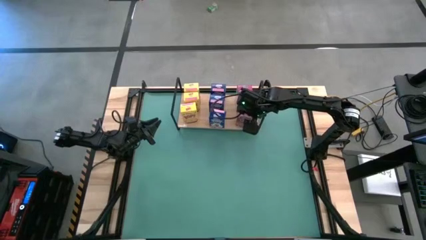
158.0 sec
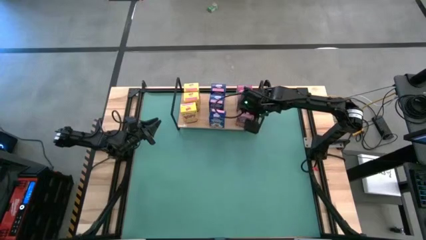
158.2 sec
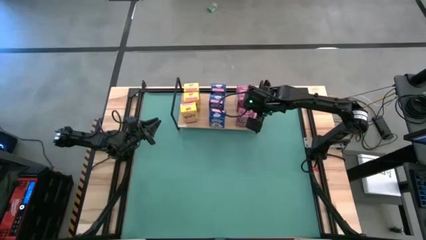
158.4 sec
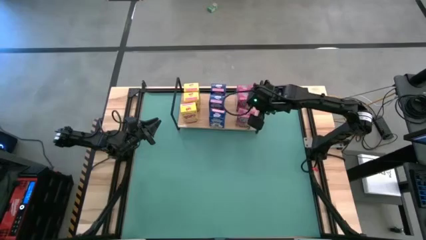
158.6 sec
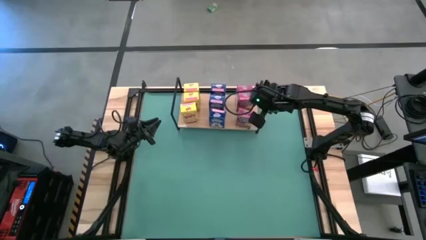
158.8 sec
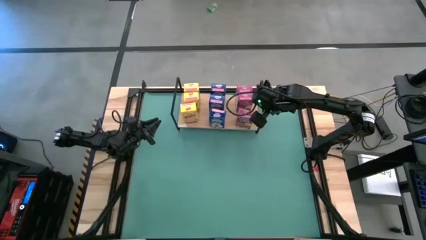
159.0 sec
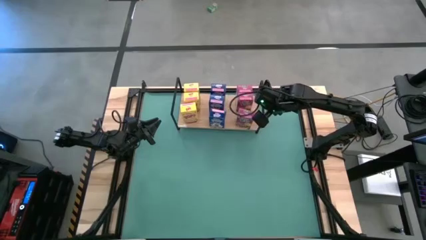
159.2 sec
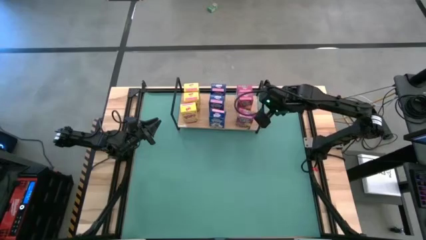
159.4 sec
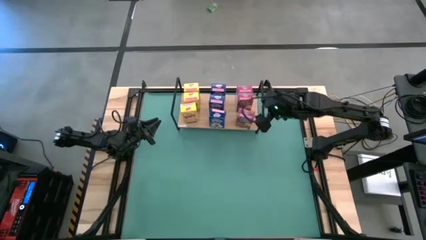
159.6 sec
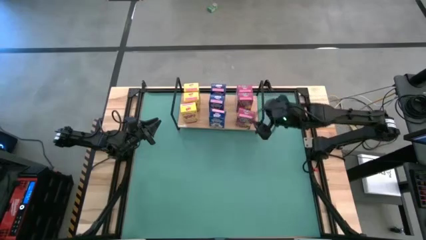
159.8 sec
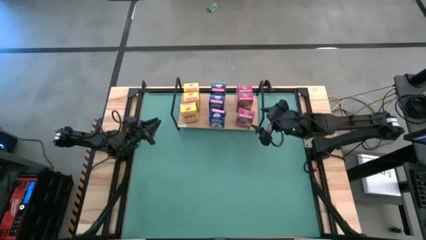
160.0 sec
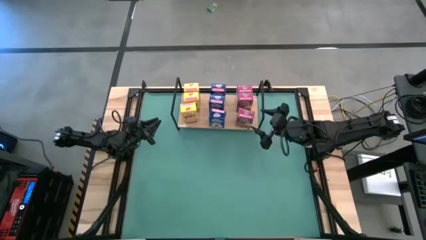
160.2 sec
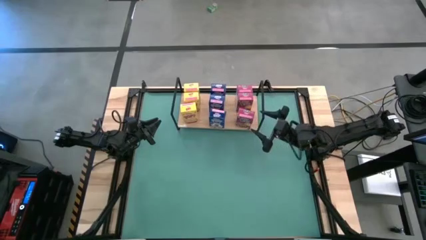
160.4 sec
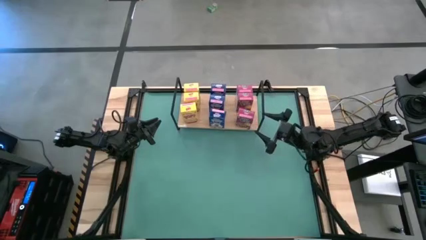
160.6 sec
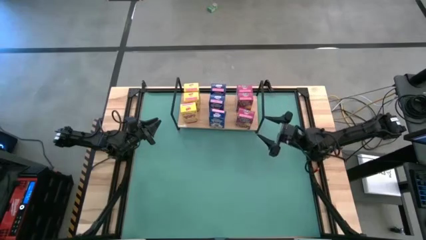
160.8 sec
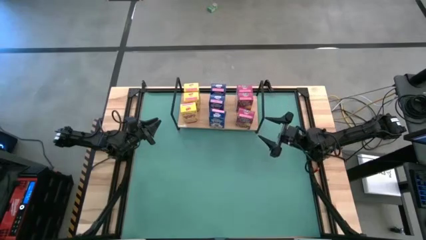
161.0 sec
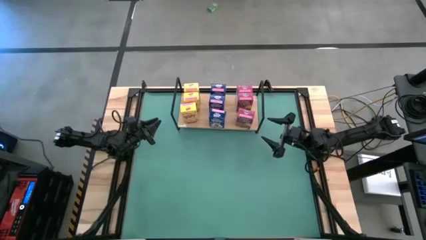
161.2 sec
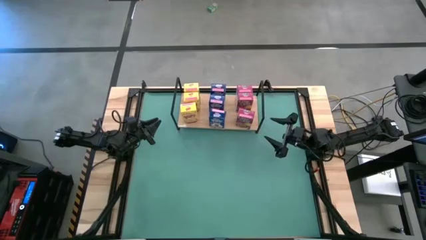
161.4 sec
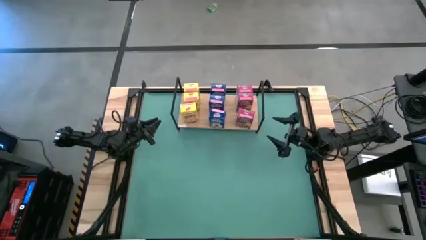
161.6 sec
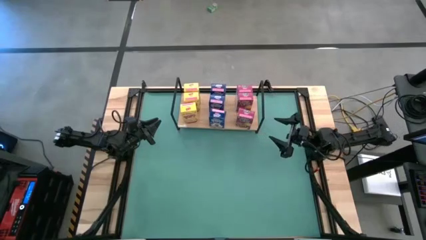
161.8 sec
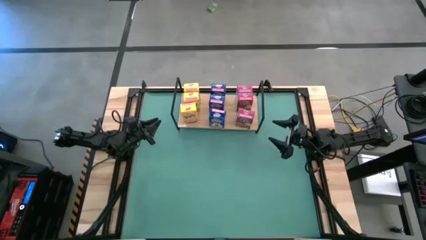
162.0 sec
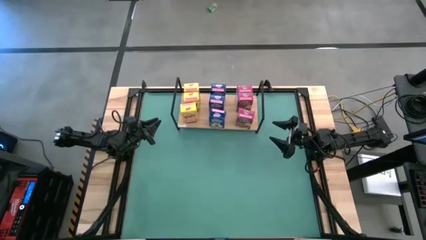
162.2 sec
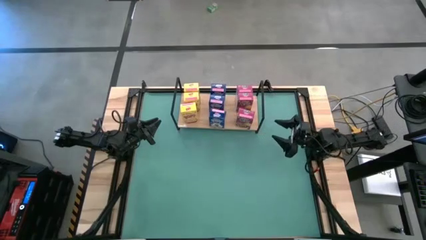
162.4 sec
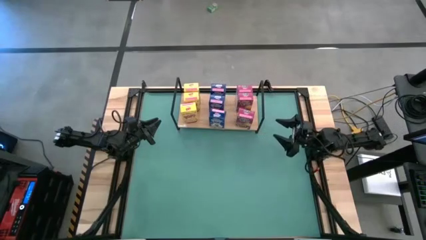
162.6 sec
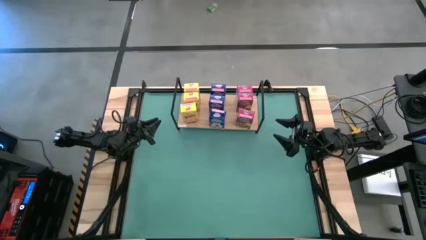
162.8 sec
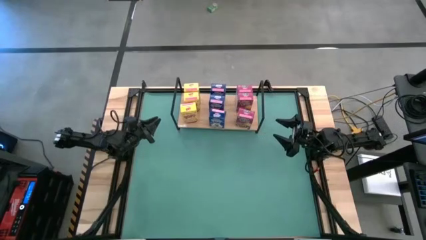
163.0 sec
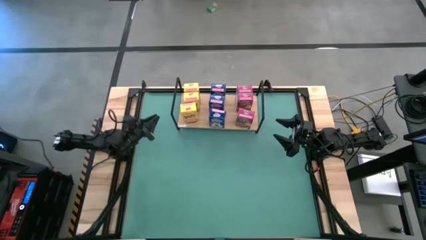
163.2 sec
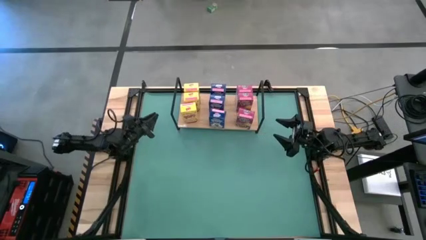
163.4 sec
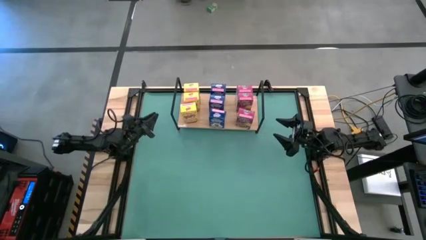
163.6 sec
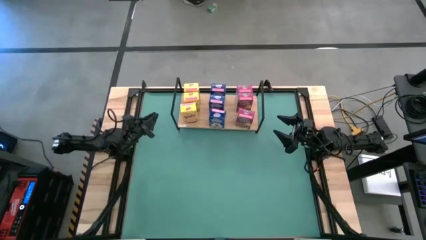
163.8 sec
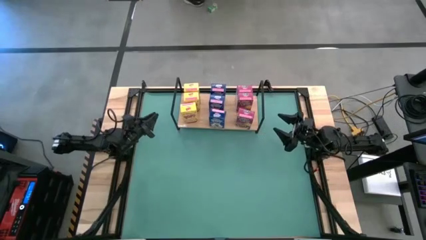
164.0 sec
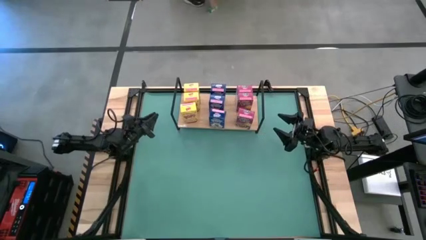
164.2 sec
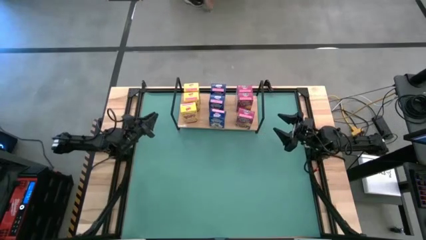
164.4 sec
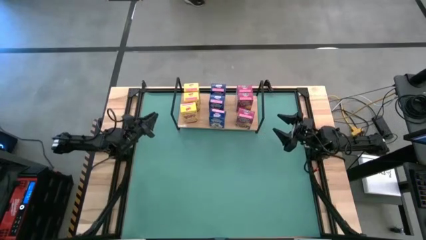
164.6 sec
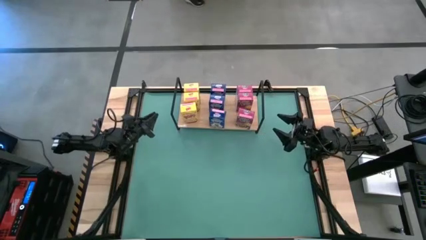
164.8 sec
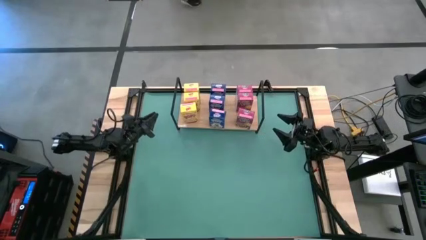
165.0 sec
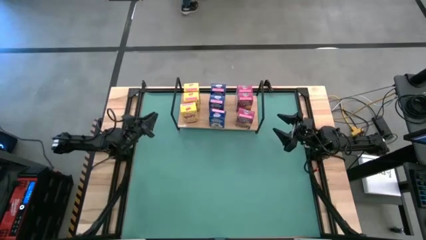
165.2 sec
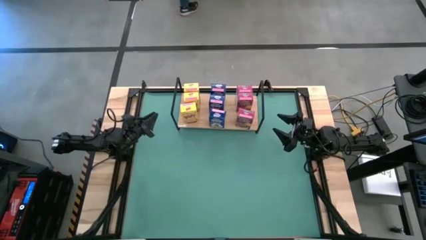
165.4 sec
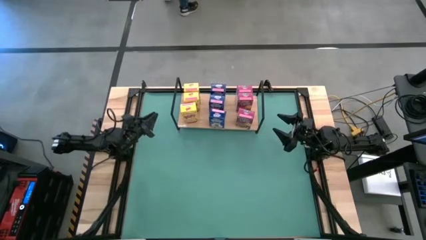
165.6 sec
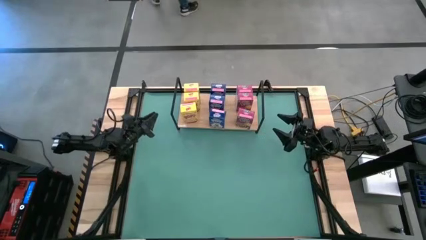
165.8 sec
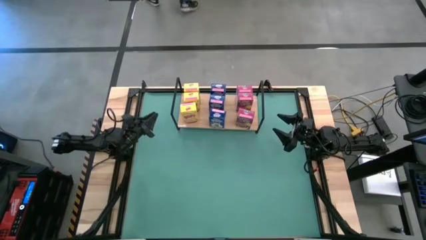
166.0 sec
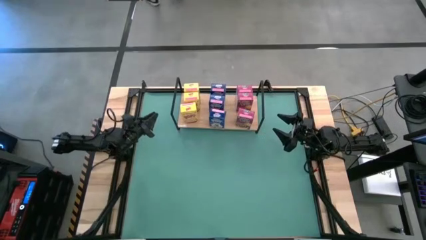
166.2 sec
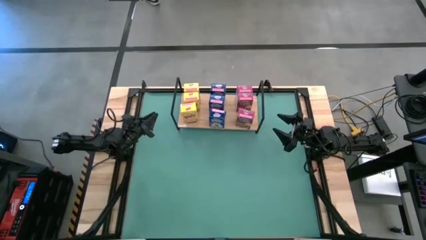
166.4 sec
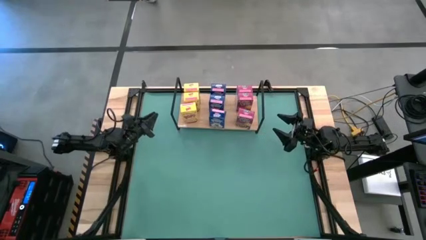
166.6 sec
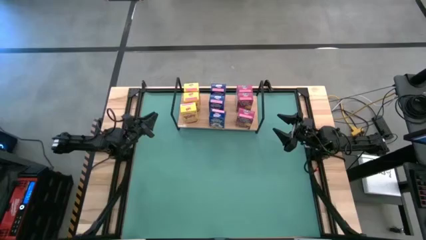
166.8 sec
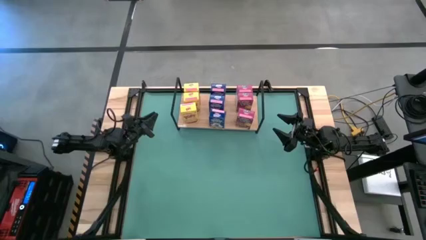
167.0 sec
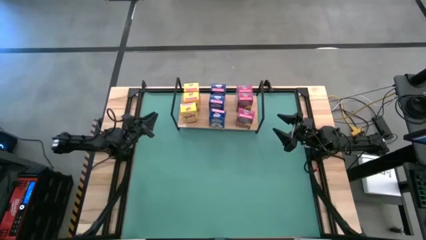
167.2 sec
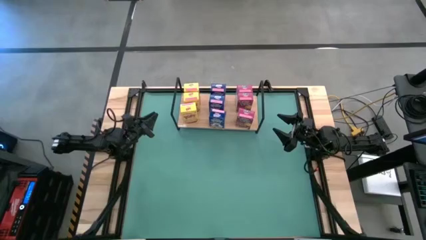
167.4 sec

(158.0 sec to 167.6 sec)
Task: Stack cereal on shelf
Return to Home Position
